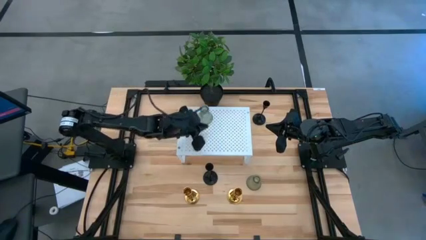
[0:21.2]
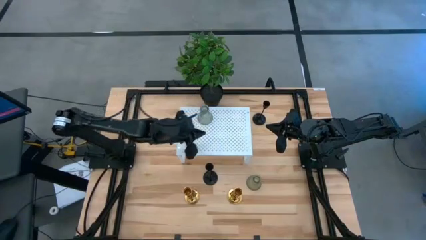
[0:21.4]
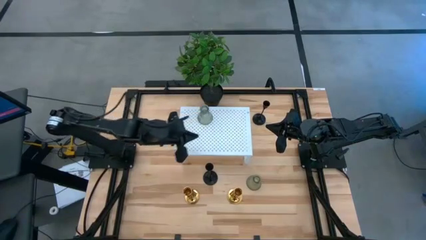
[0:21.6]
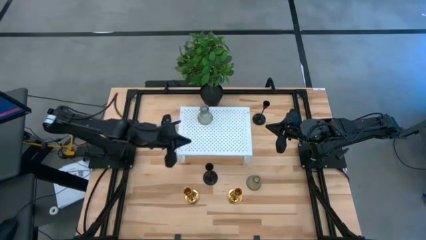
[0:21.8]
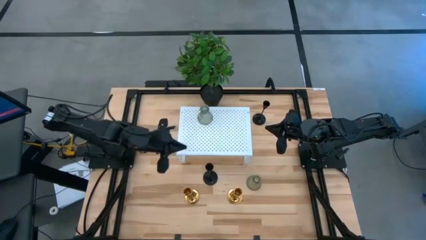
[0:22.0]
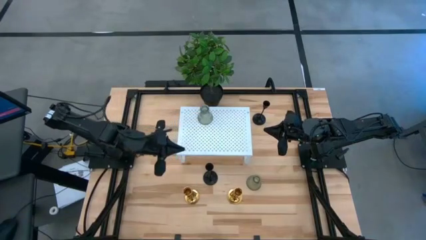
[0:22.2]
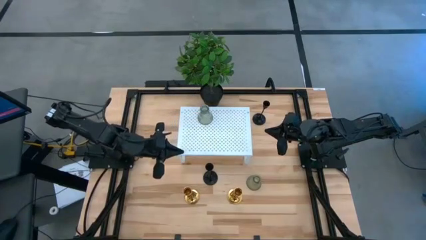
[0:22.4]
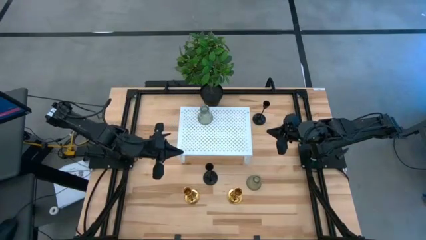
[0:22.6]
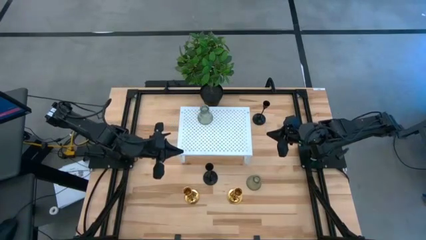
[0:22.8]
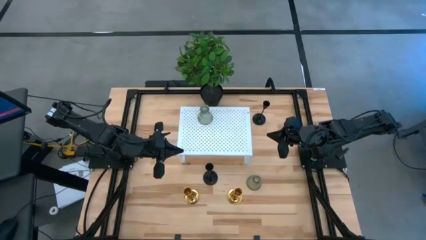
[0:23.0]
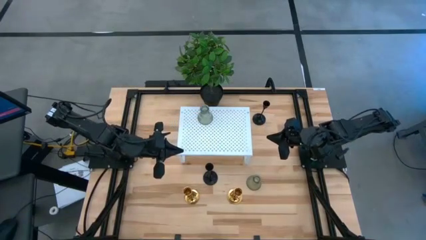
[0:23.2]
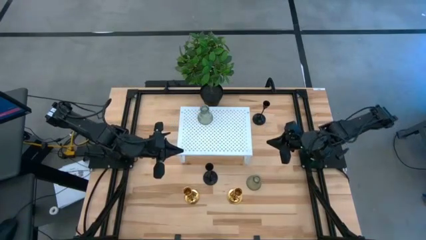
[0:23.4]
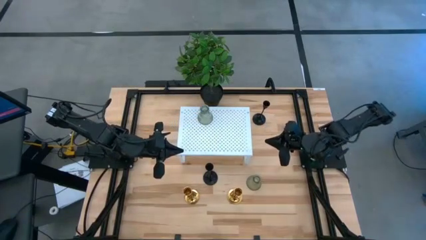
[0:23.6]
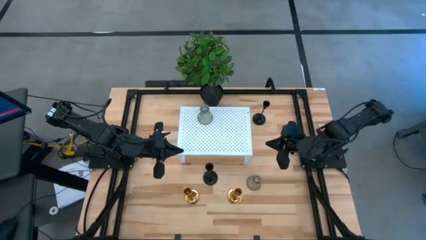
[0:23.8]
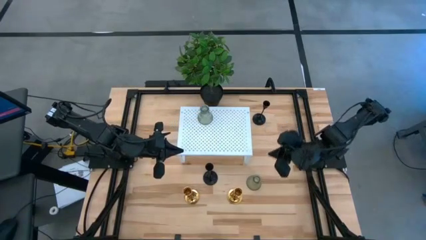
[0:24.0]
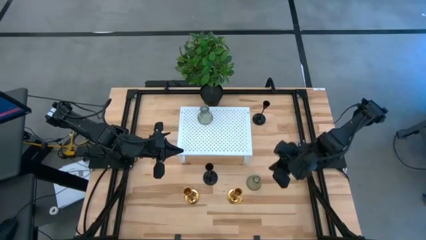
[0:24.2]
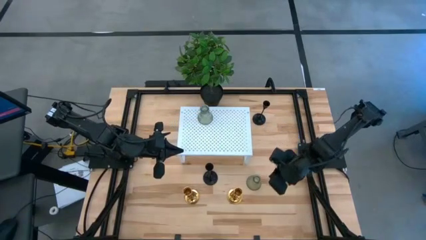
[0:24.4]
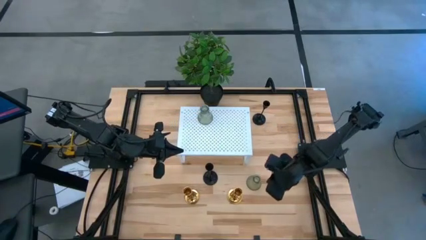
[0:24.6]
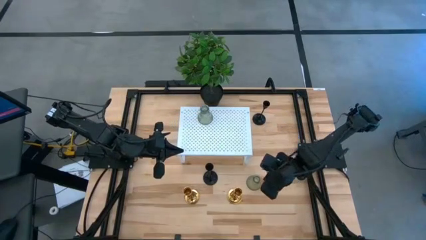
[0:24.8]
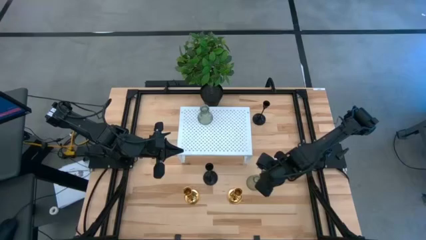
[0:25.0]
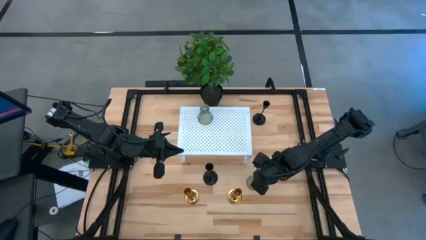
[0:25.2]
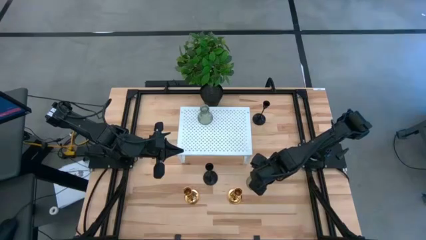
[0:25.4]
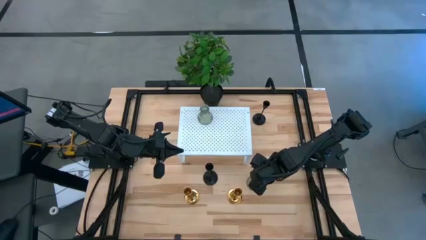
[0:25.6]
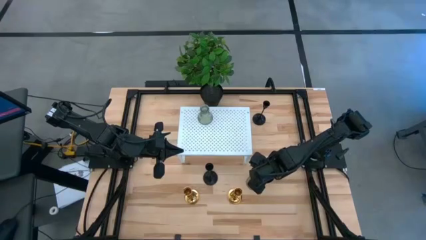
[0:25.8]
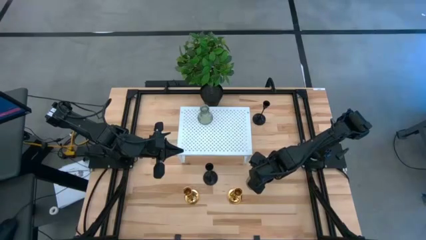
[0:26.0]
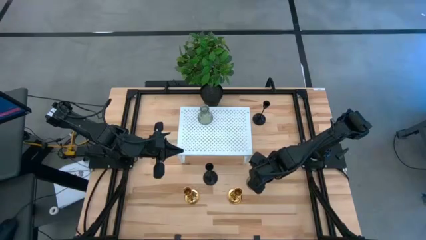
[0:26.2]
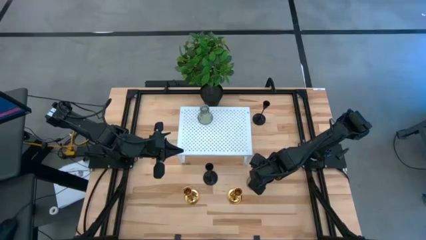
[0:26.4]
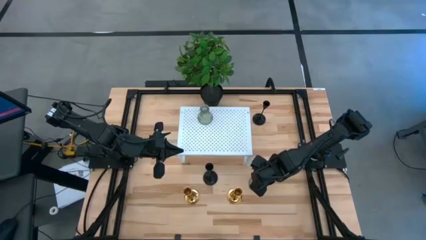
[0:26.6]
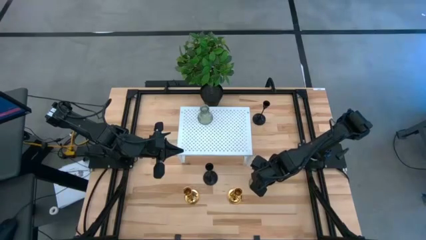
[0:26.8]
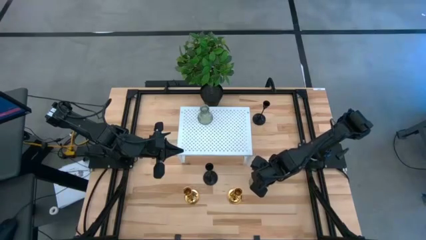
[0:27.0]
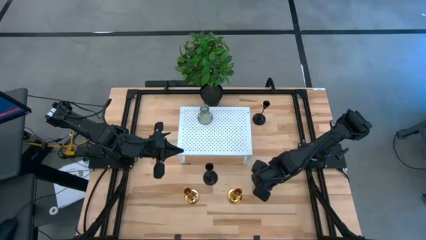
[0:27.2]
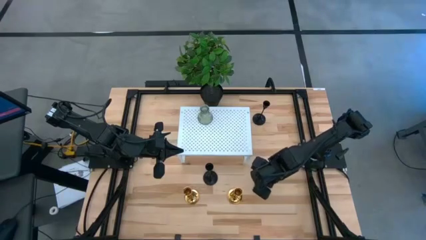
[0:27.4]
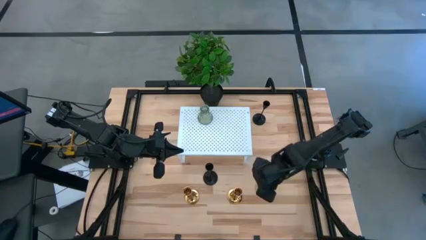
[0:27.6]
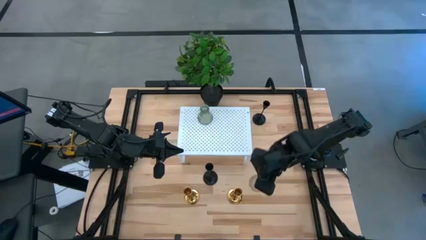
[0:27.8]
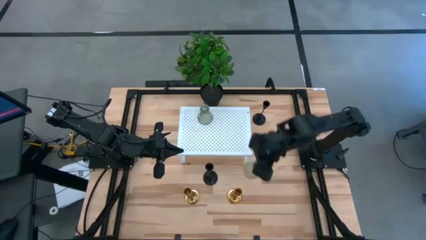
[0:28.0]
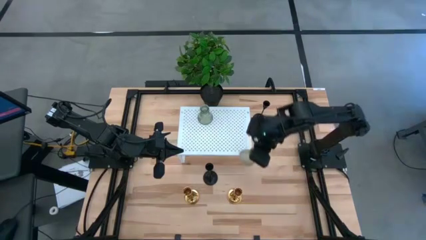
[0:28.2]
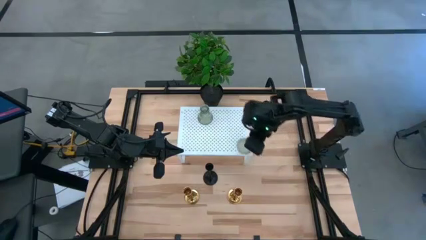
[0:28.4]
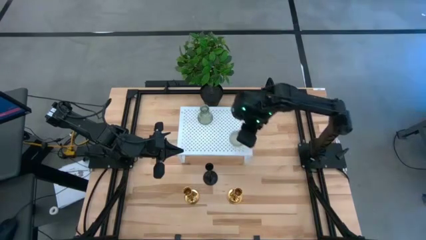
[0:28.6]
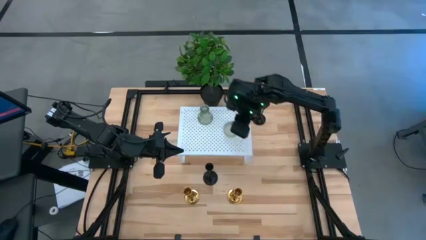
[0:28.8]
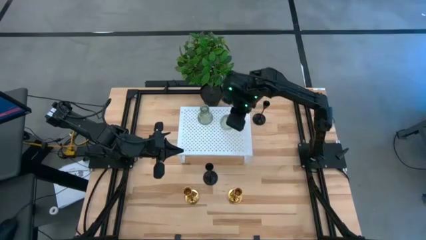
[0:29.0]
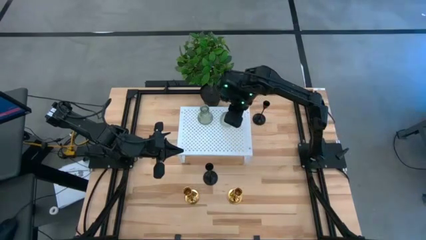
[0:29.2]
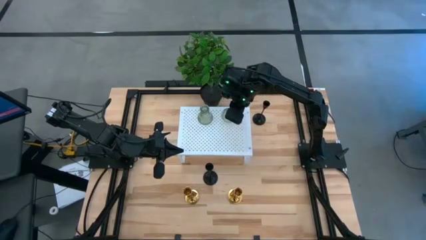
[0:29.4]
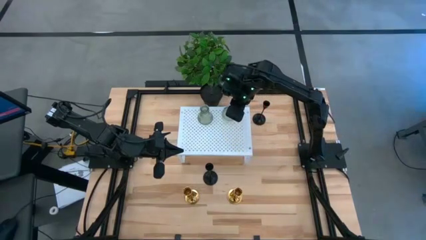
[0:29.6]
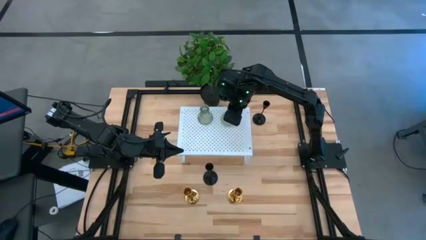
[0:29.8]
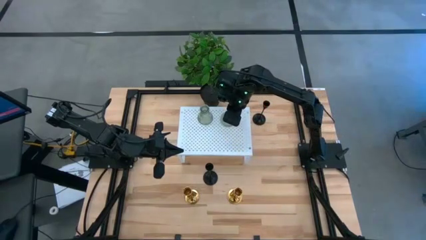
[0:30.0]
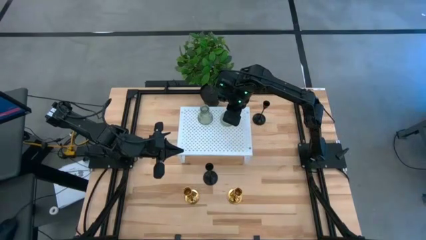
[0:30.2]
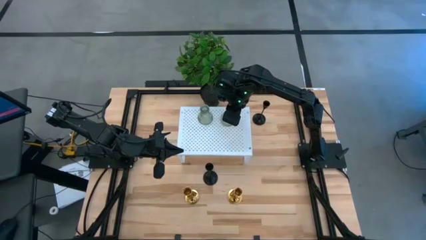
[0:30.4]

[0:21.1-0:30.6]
Task: Pick & Place candle stick holders
Put the green candle holder on the shelf

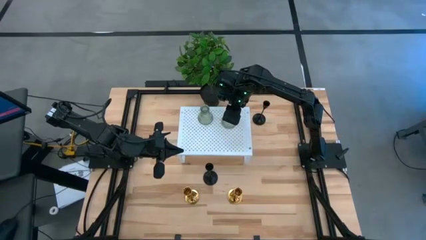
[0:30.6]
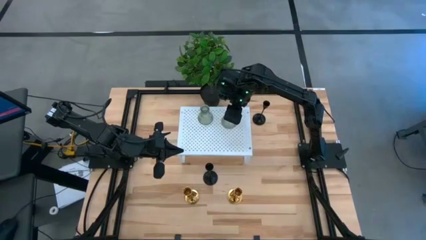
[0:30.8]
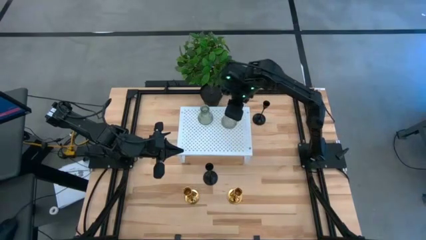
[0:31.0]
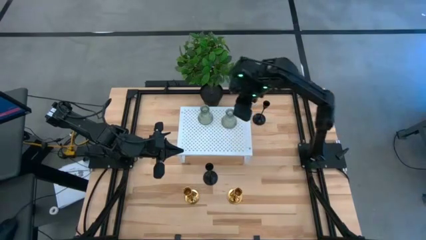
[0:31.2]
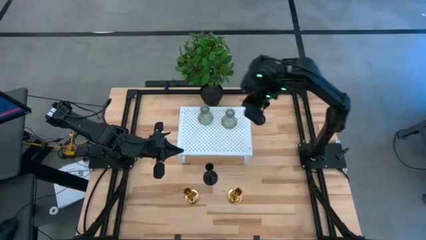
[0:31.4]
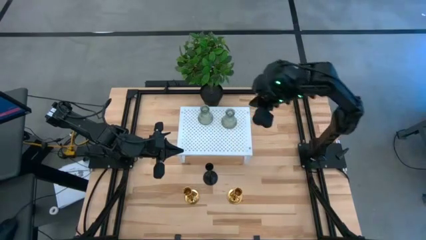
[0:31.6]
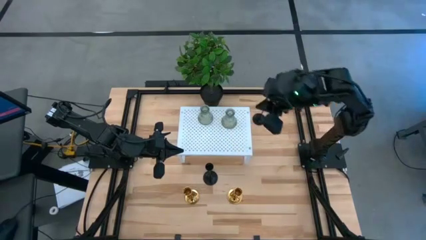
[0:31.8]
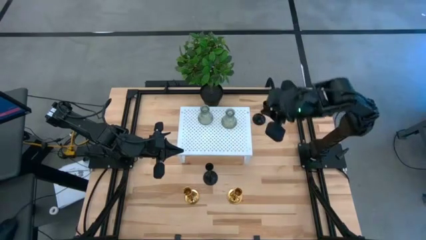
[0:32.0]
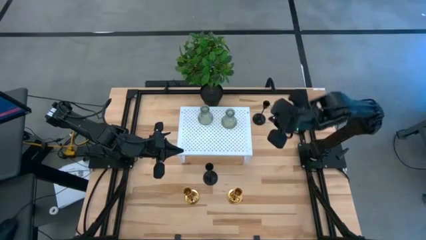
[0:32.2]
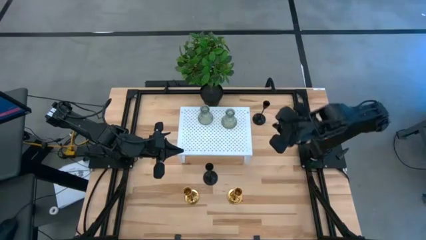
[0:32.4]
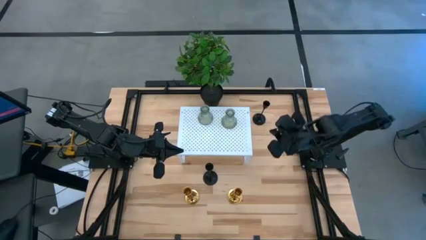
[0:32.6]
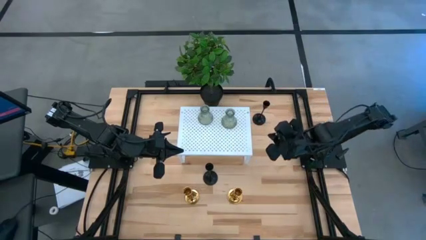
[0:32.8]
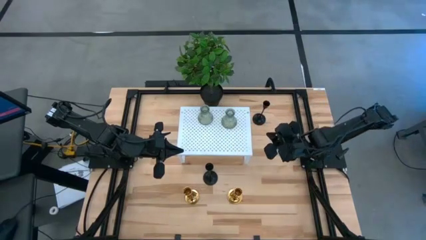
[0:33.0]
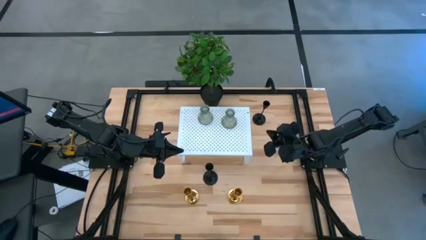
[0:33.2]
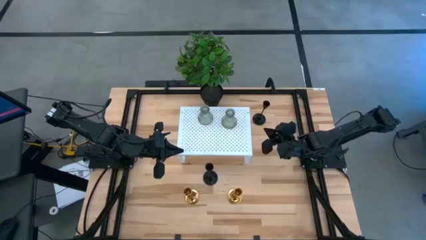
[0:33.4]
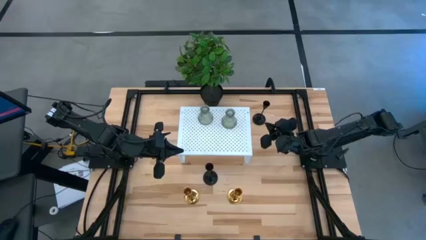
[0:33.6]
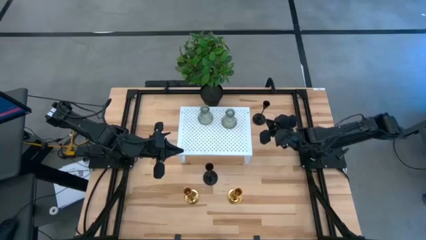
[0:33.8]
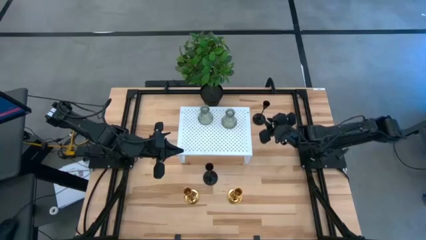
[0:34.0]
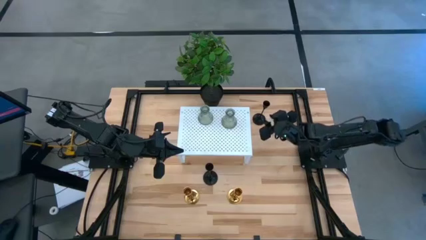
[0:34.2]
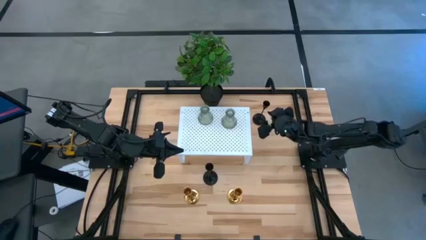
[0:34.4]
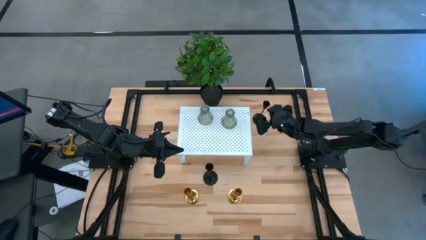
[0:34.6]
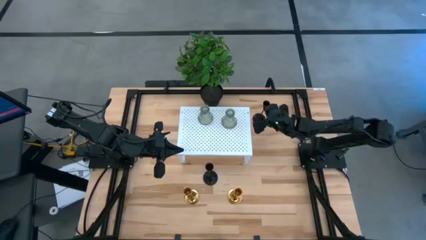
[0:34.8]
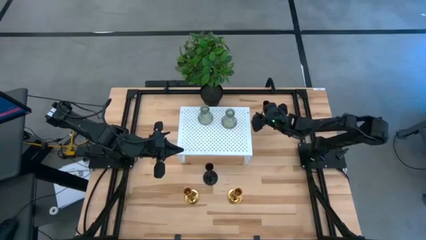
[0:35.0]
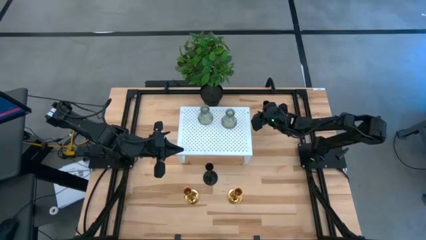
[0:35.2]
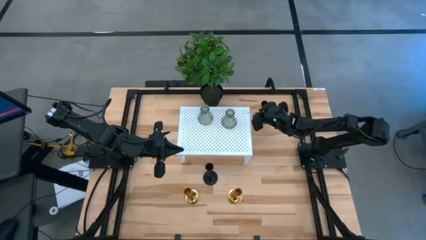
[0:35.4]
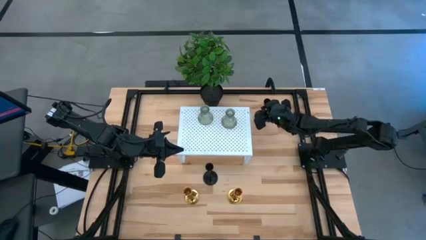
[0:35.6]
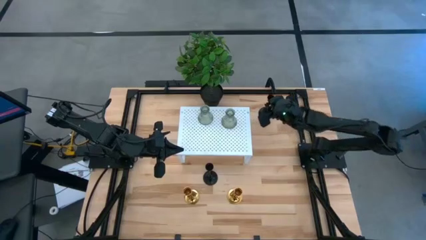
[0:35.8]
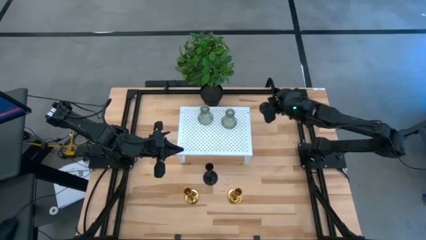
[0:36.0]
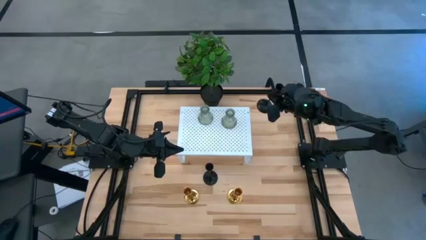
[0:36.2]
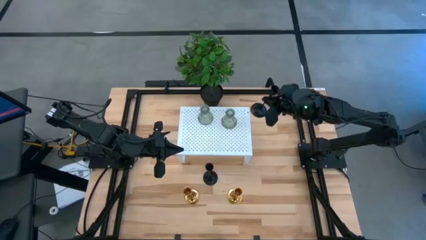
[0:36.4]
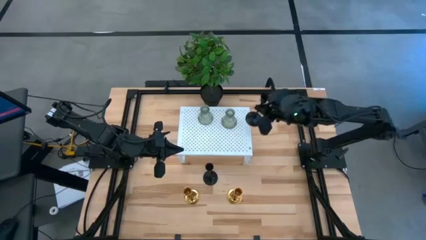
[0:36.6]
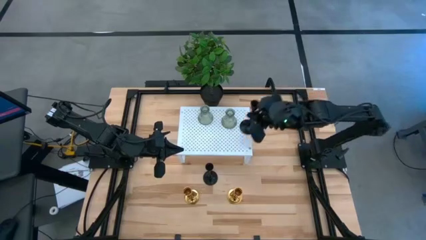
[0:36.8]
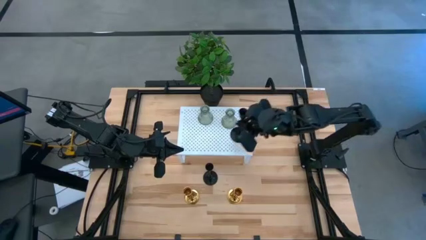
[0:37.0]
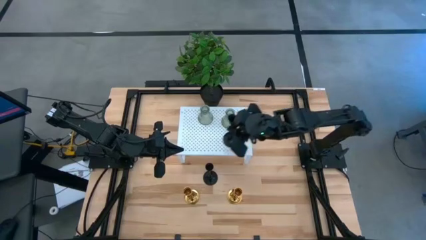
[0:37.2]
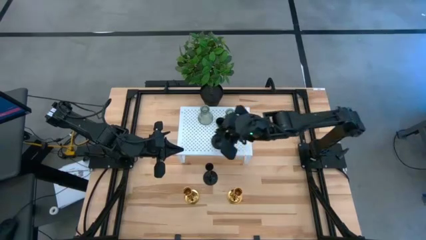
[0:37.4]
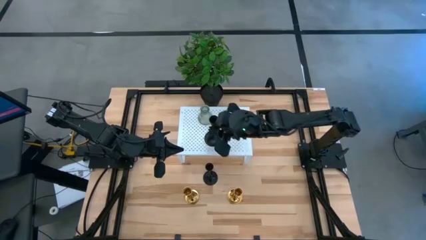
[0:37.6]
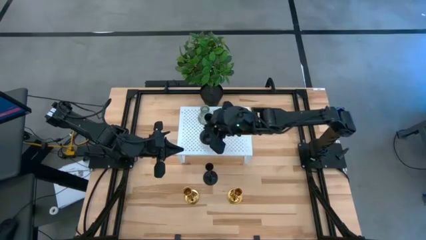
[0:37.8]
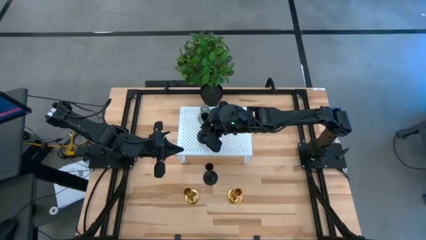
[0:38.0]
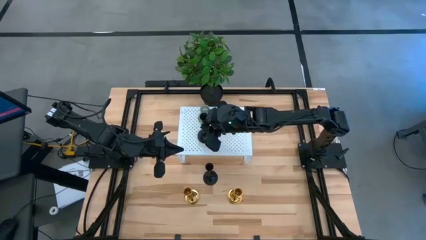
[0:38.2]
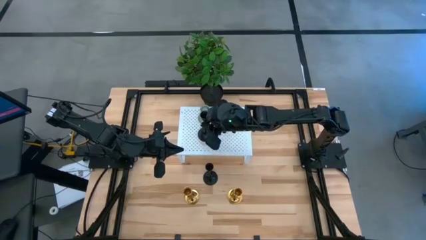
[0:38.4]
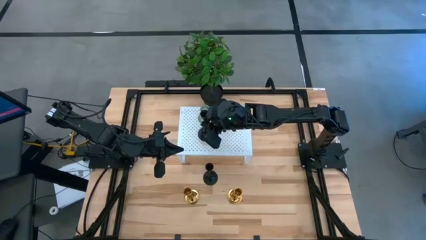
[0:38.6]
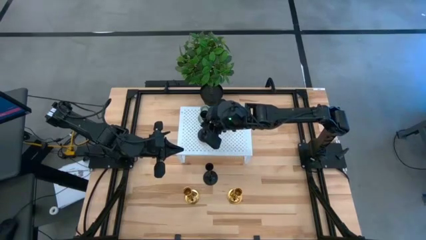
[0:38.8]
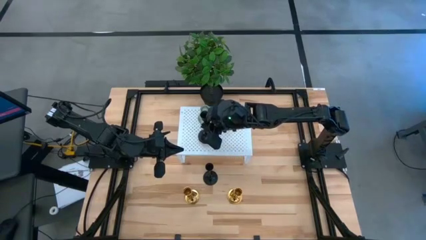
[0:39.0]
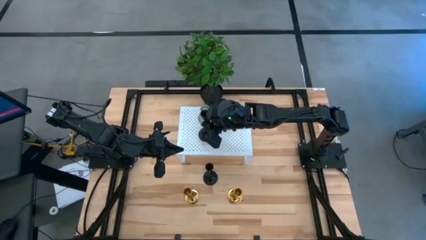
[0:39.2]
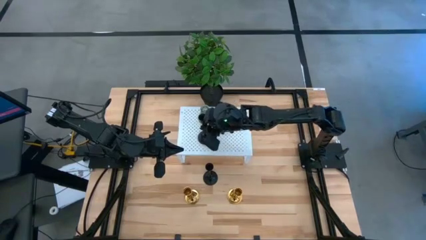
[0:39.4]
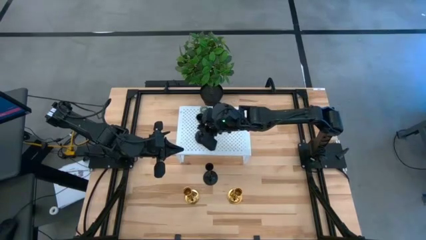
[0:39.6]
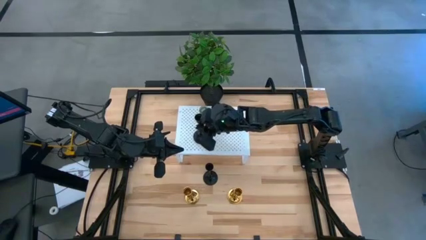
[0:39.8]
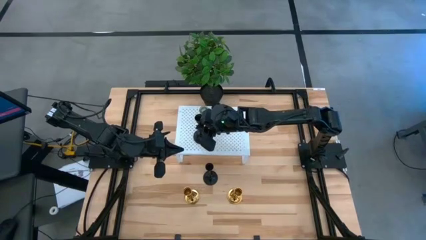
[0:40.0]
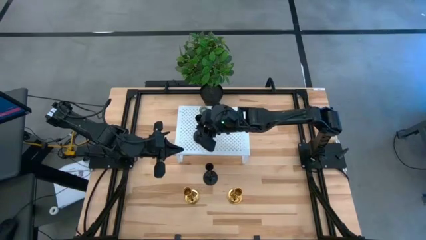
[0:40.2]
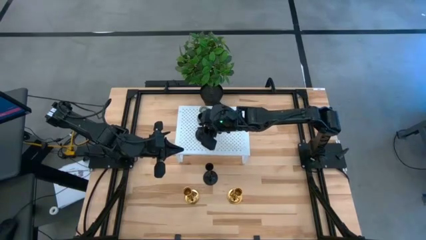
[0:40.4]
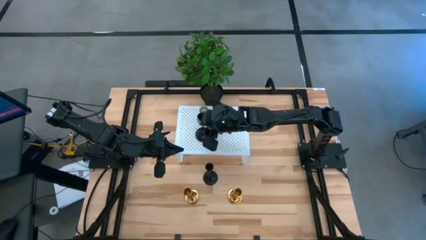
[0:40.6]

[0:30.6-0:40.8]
Put the top black candle holder on the shelf
